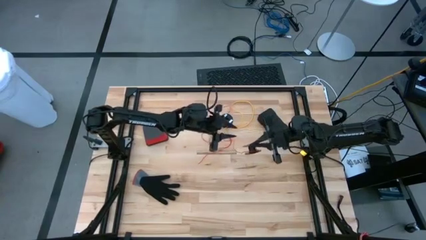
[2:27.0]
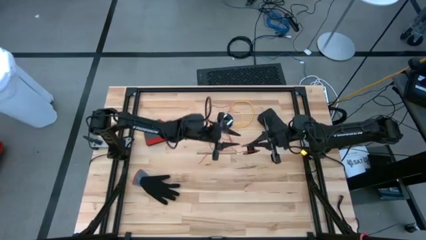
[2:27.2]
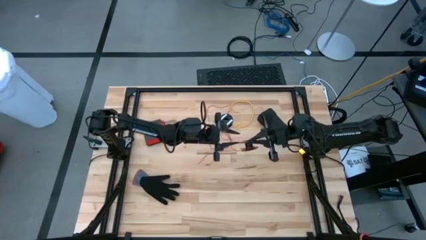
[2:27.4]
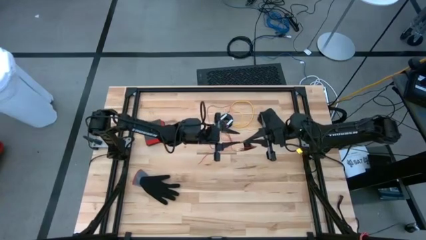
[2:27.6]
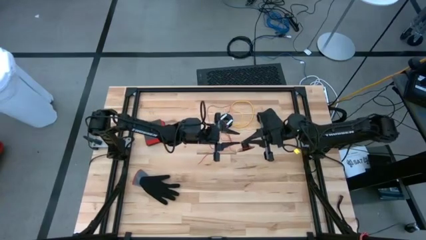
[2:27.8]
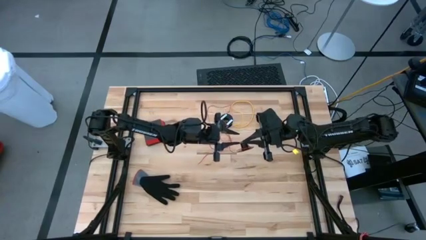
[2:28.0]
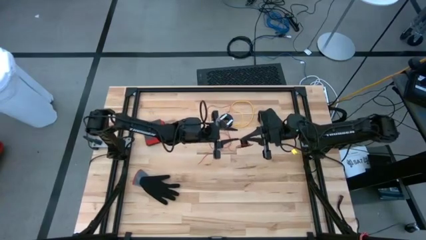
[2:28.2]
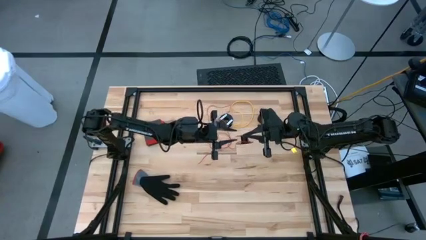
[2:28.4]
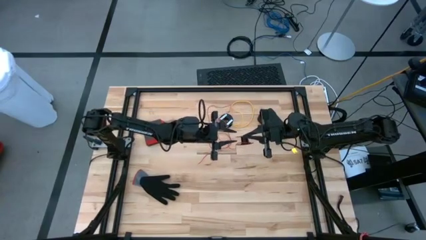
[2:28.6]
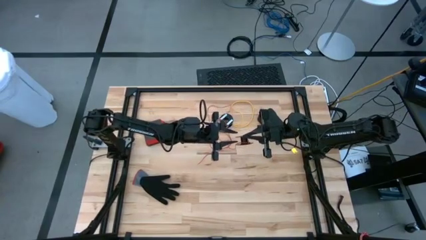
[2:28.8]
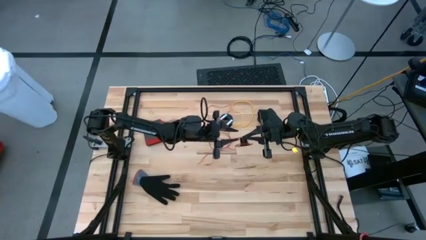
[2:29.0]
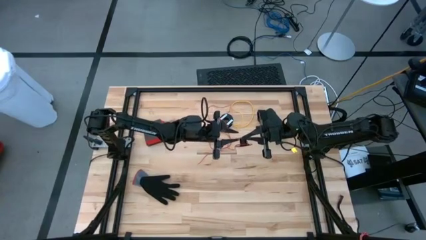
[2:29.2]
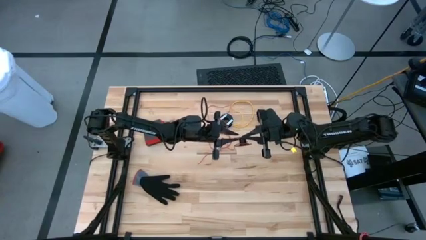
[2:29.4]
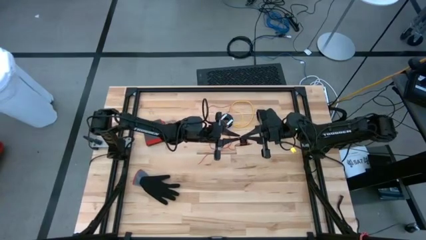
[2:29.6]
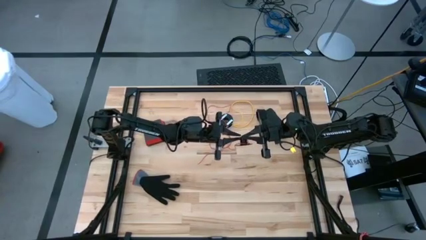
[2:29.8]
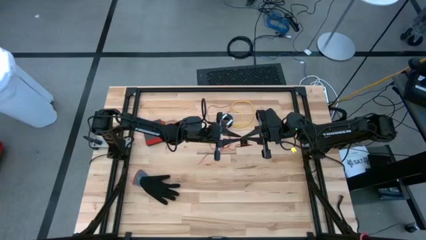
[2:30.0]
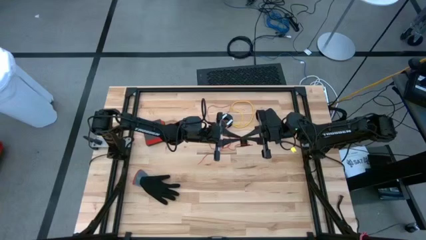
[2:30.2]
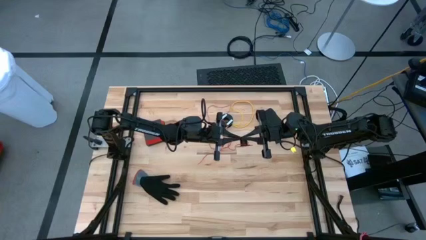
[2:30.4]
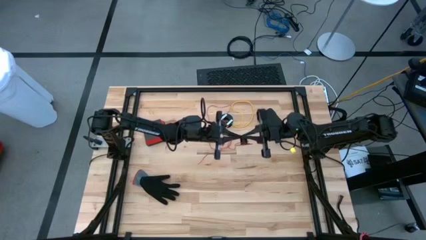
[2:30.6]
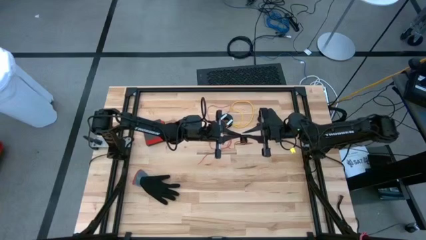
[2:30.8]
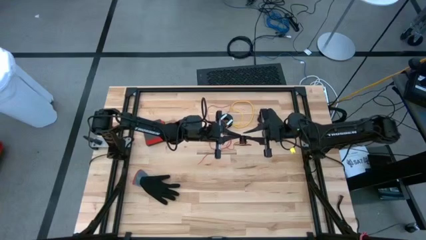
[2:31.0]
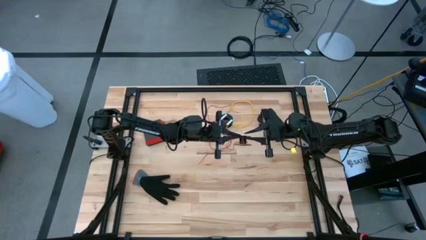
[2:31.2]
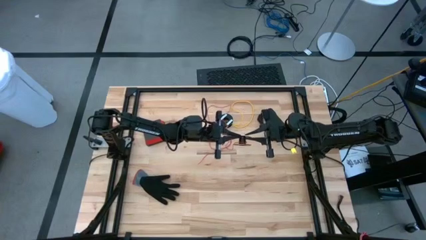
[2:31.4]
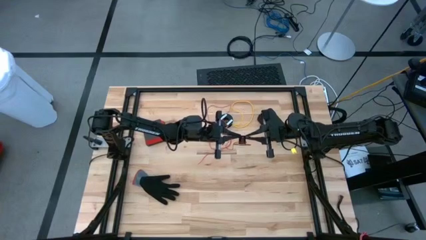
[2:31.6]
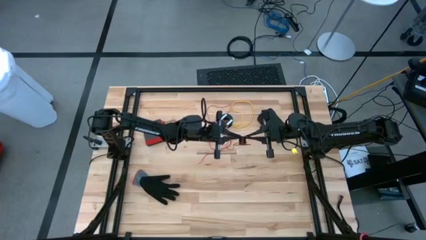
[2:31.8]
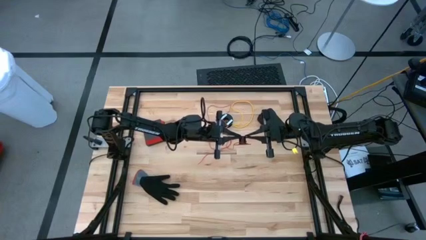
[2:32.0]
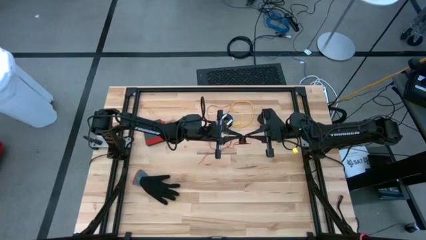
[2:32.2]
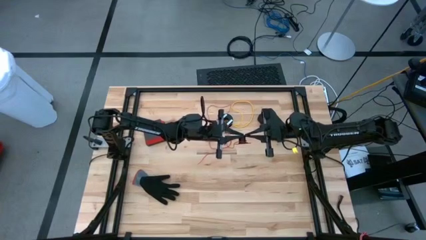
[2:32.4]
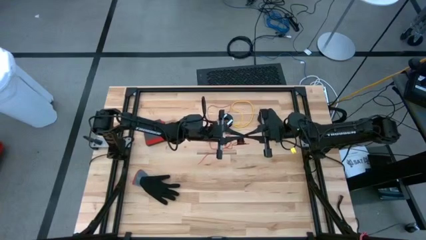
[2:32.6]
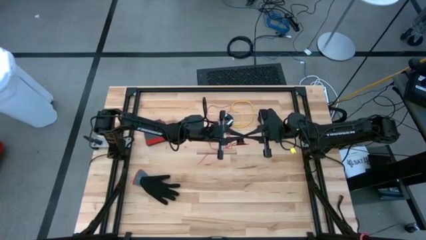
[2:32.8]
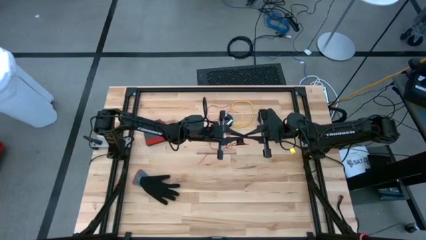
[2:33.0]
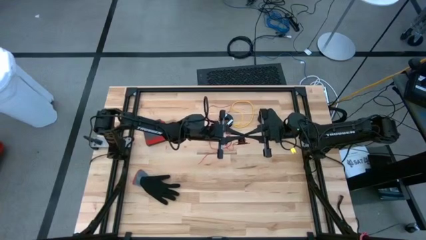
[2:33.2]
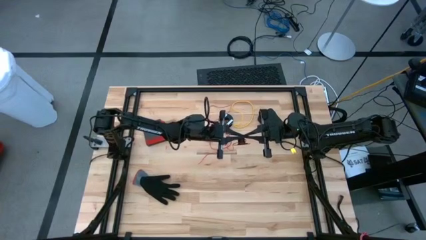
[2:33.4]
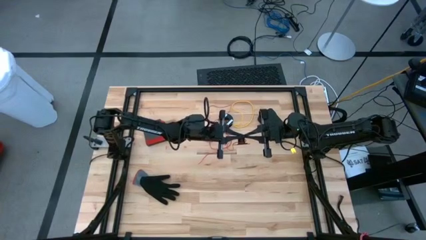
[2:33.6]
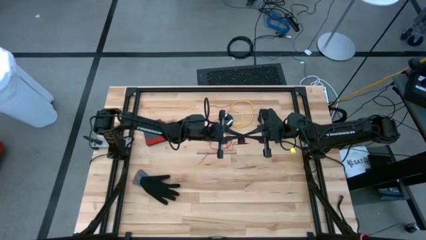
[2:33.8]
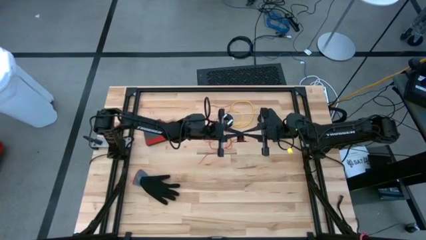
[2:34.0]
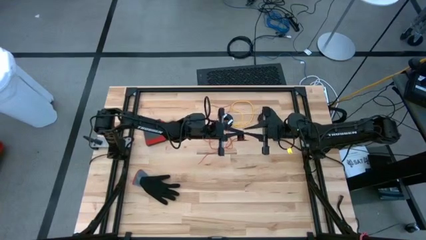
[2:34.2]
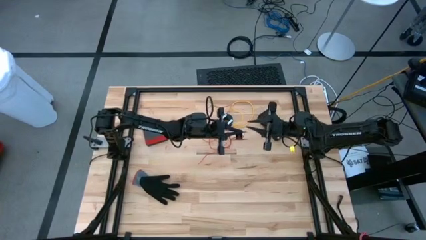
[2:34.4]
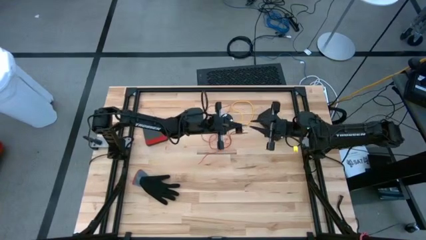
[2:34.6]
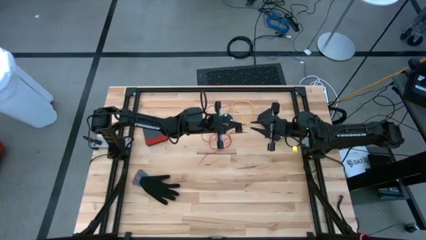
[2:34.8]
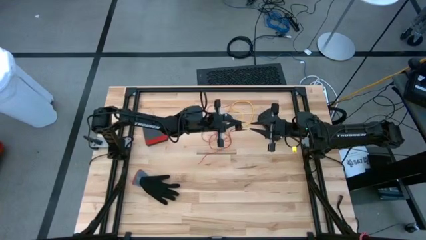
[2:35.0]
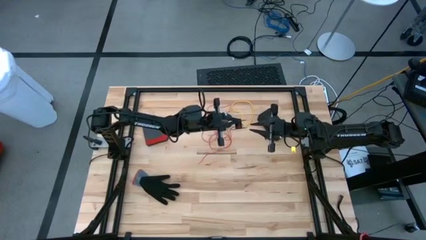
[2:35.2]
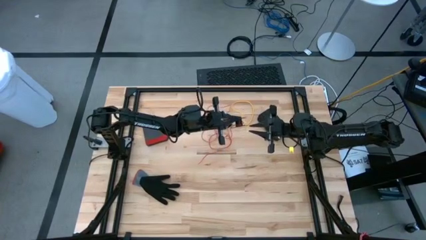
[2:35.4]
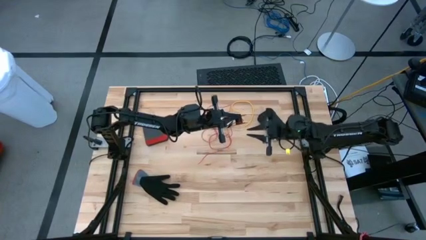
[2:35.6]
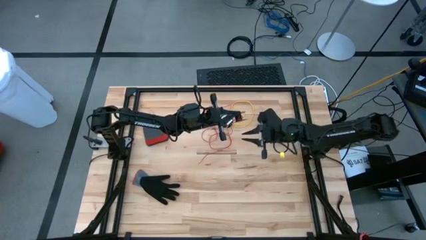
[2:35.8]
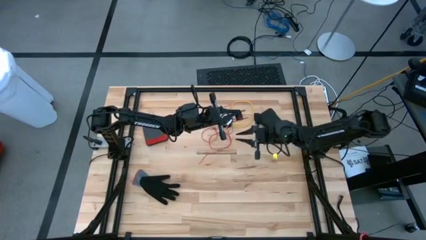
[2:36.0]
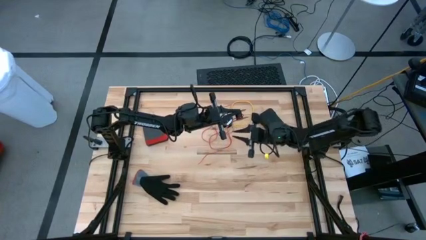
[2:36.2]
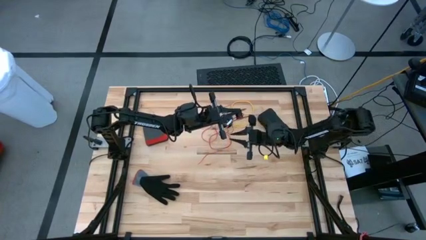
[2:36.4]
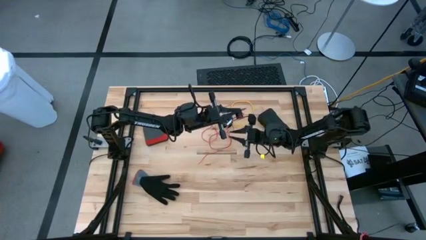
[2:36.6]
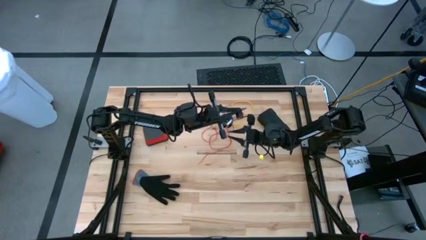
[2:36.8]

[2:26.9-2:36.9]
Task: Coil cords
Coil the red wire into the spool

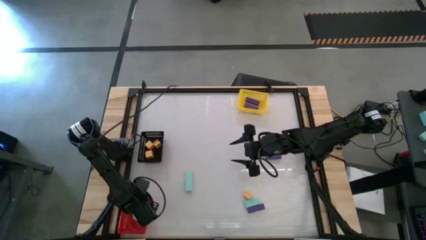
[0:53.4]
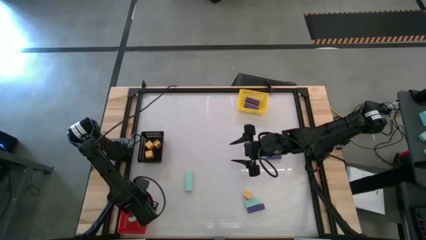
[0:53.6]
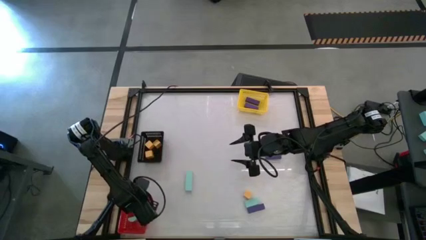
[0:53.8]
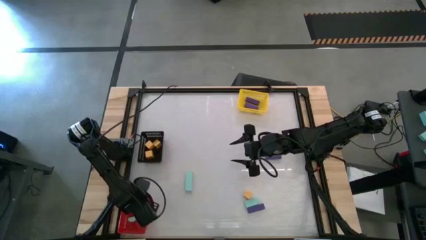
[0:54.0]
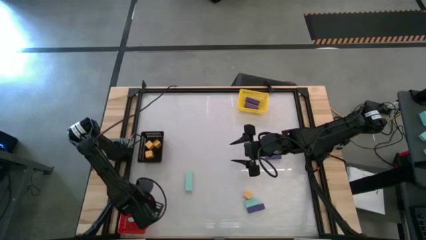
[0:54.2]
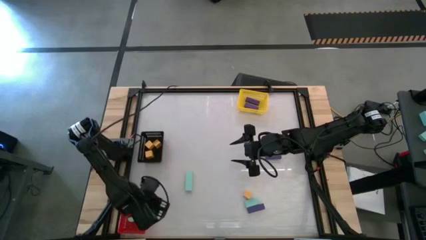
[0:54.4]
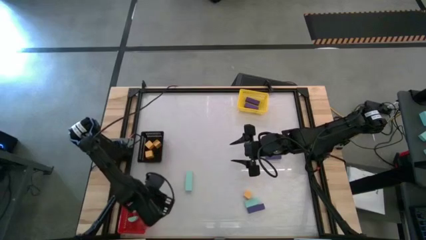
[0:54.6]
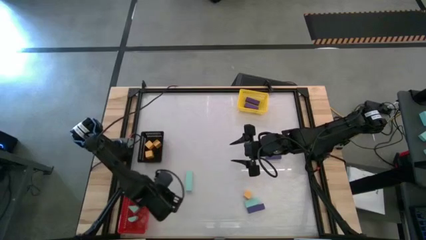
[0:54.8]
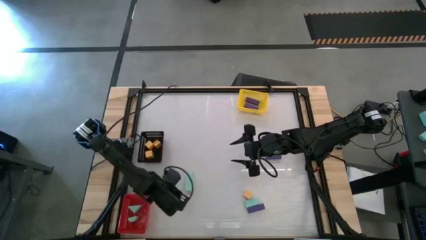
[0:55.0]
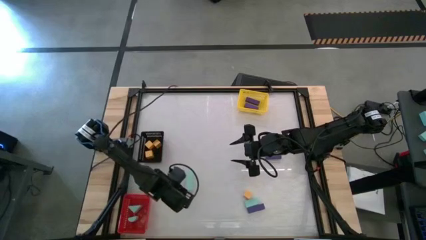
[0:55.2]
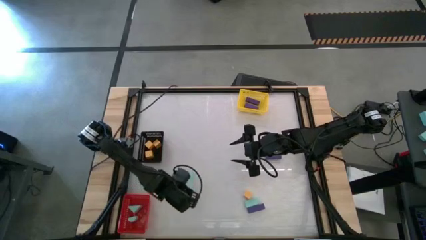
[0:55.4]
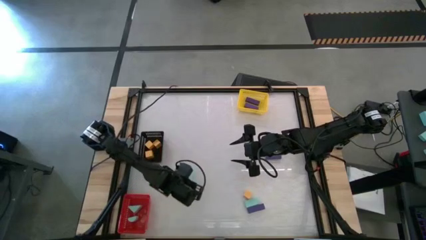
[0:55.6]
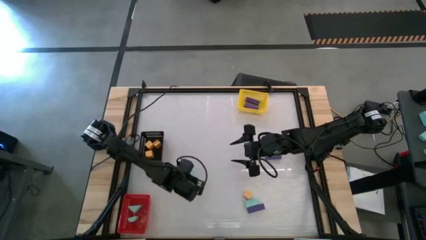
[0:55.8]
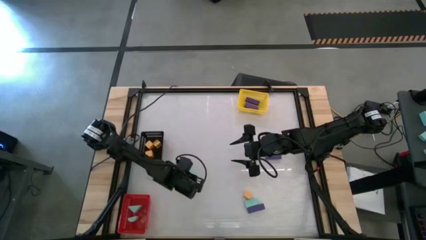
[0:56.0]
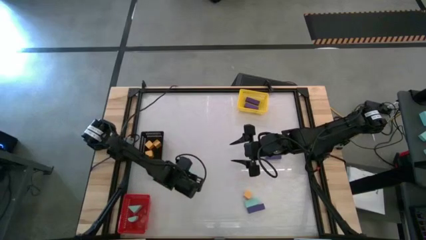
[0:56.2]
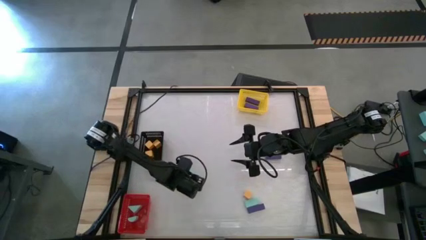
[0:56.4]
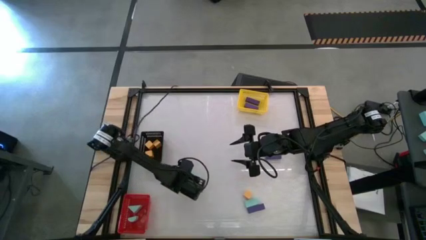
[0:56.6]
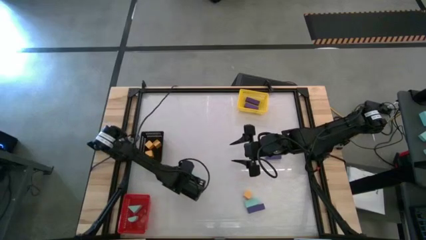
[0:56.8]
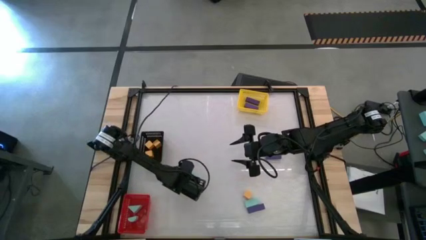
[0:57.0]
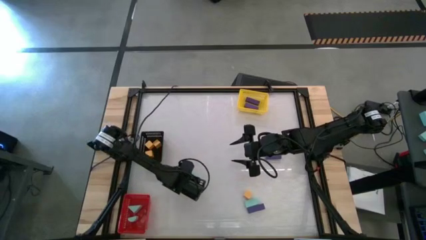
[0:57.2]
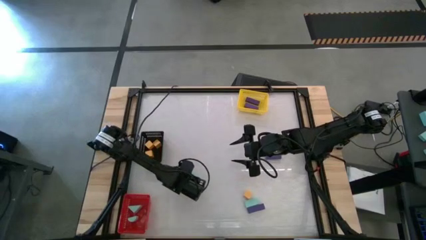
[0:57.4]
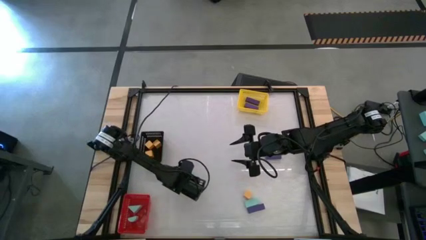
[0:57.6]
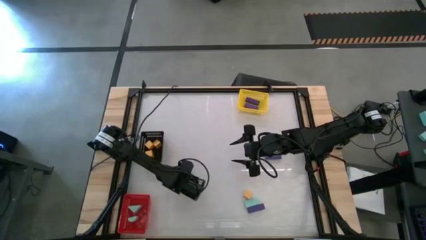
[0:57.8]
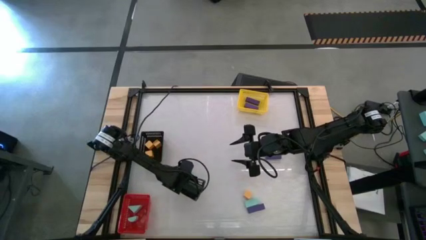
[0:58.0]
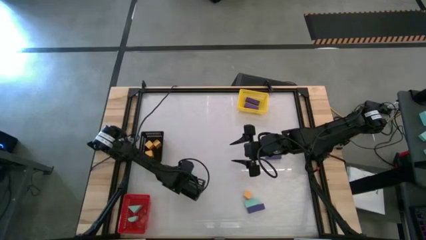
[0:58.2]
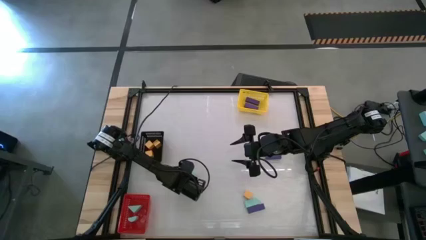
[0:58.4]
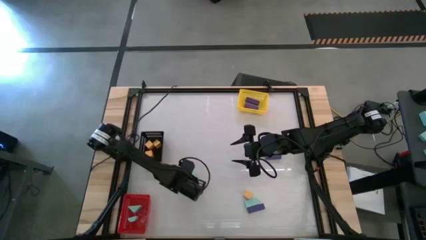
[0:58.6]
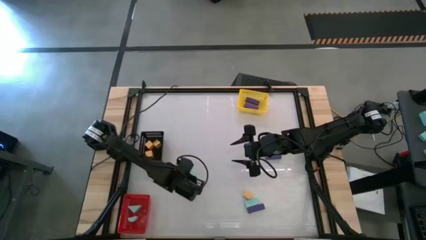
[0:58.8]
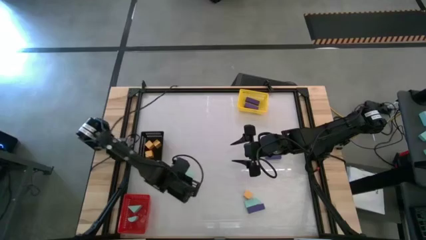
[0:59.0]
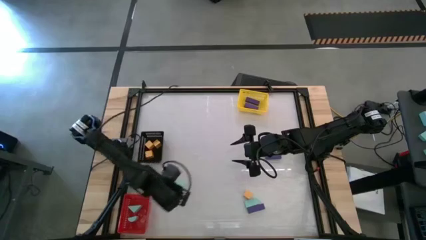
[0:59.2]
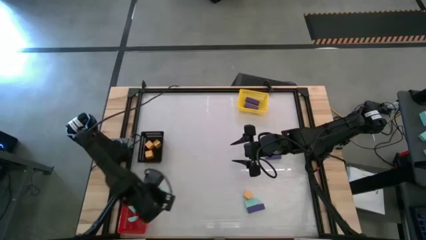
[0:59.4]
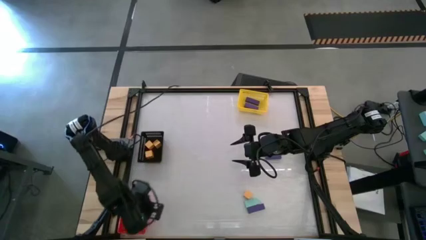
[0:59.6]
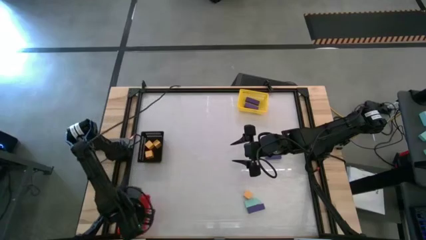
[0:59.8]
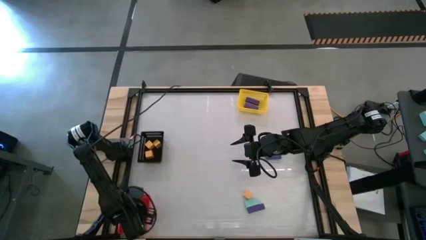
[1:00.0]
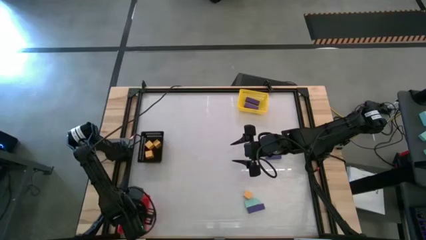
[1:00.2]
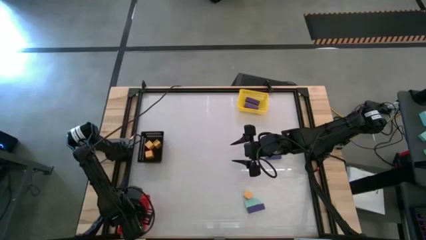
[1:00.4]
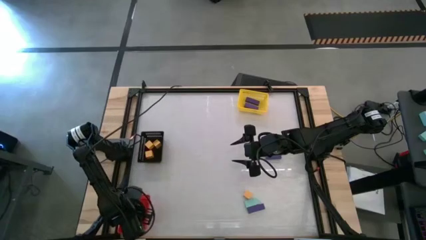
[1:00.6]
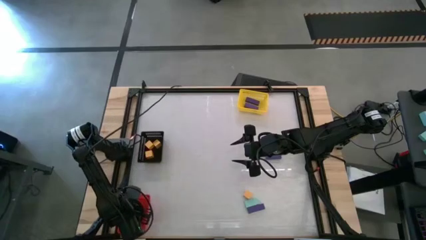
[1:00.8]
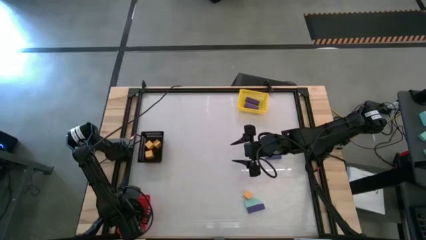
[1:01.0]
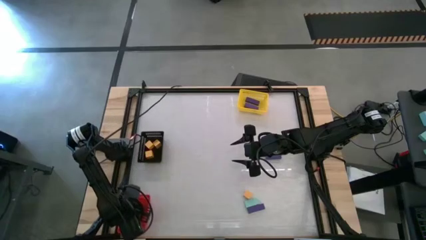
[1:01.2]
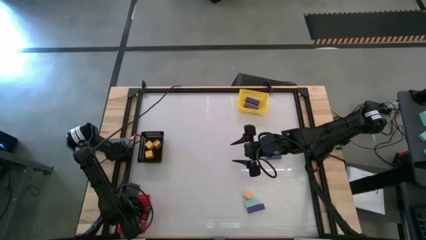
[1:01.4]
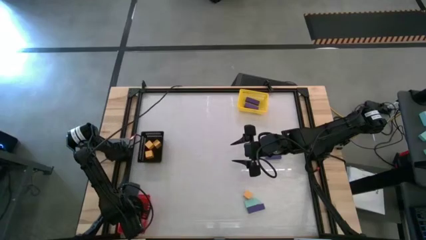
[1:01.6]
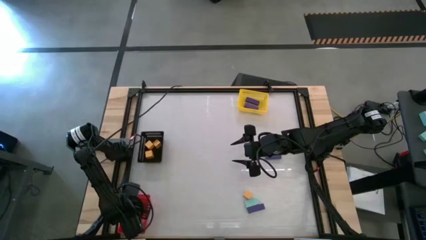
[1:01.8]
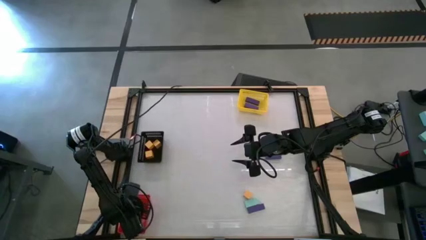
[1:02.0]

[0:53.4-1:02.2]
Task: Sort & place blocks by color
Put the light blue block into the red bin
